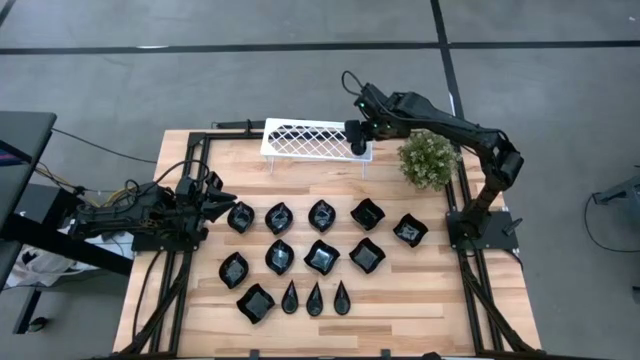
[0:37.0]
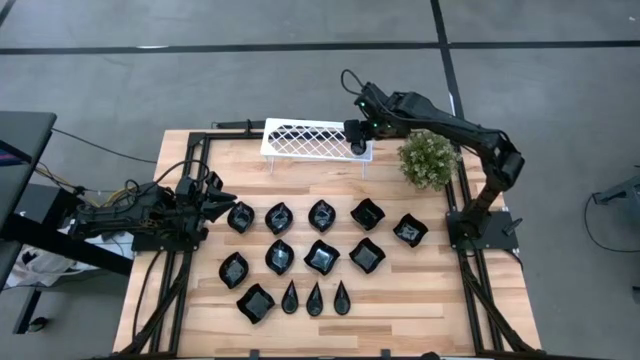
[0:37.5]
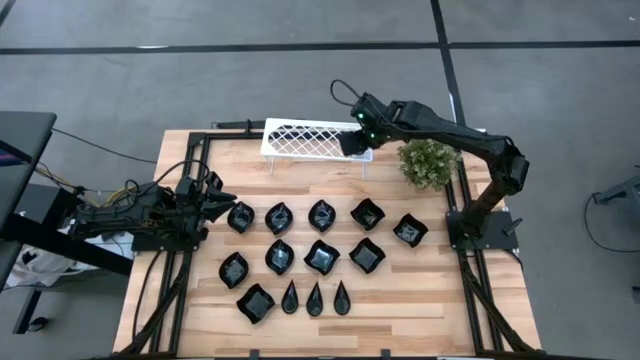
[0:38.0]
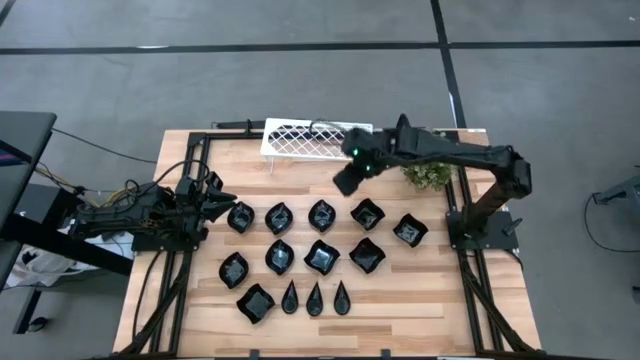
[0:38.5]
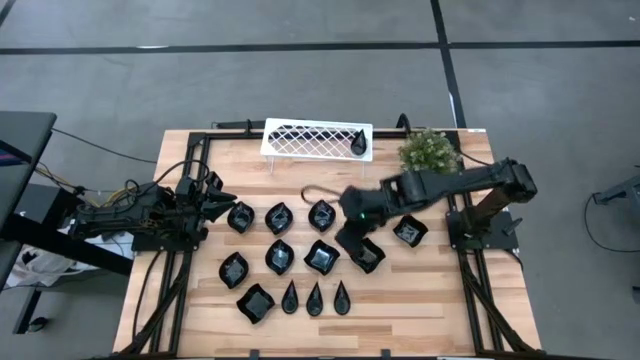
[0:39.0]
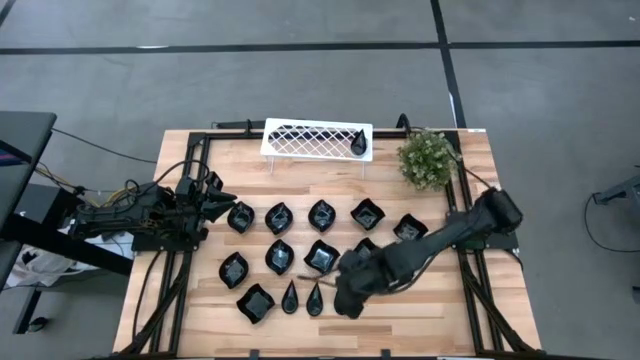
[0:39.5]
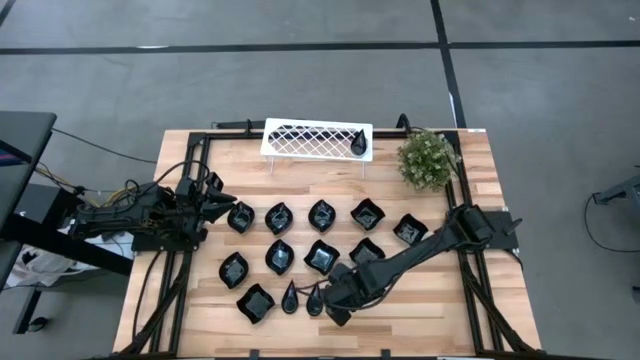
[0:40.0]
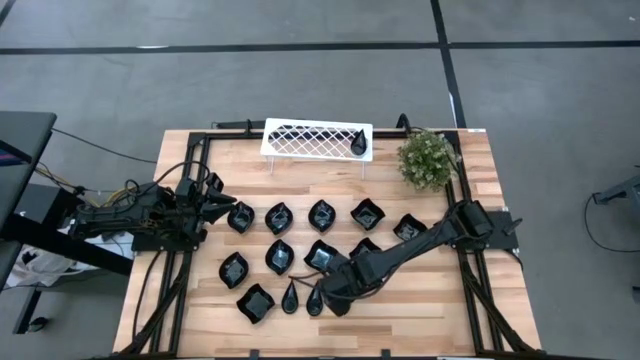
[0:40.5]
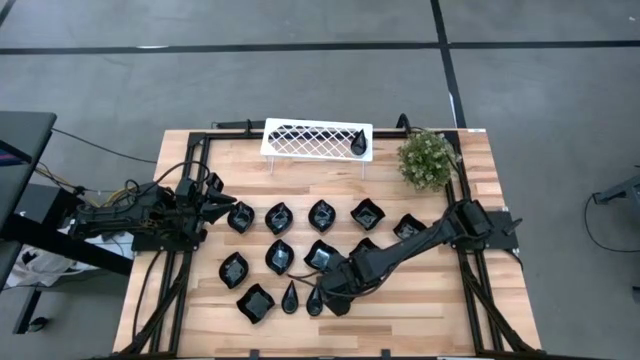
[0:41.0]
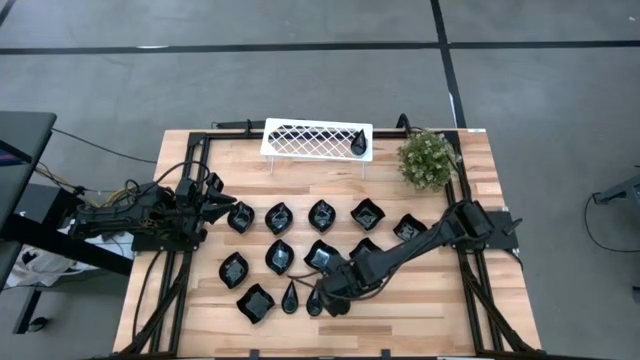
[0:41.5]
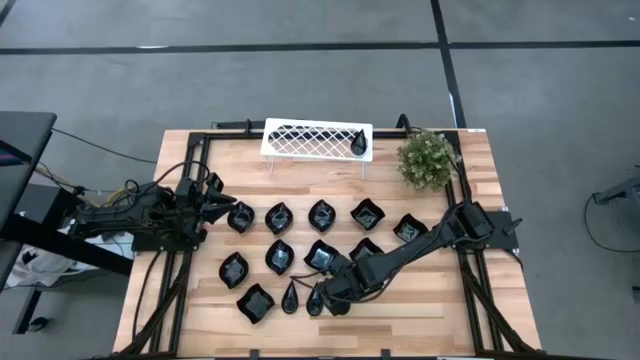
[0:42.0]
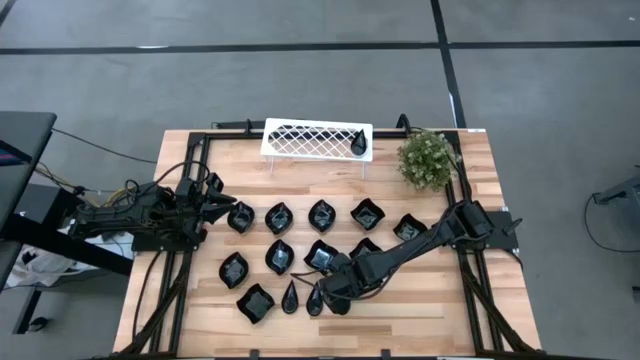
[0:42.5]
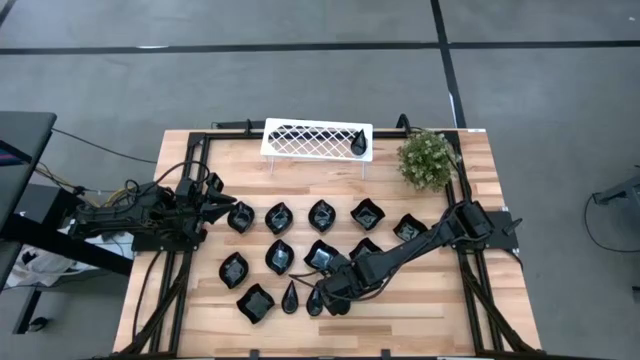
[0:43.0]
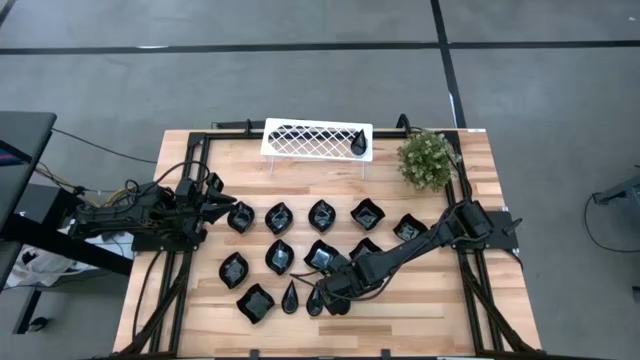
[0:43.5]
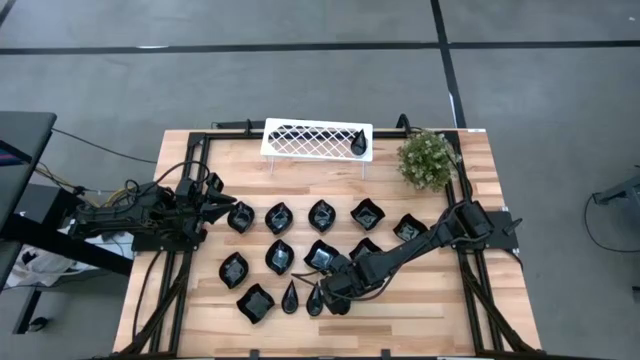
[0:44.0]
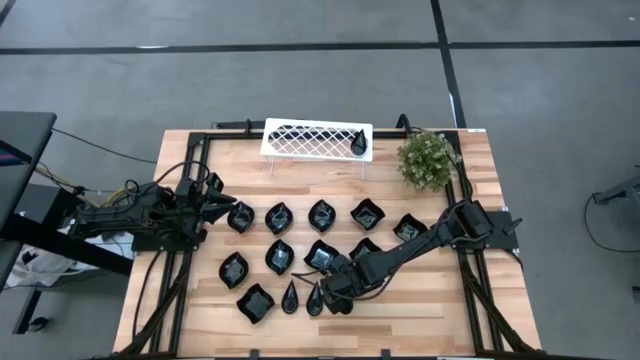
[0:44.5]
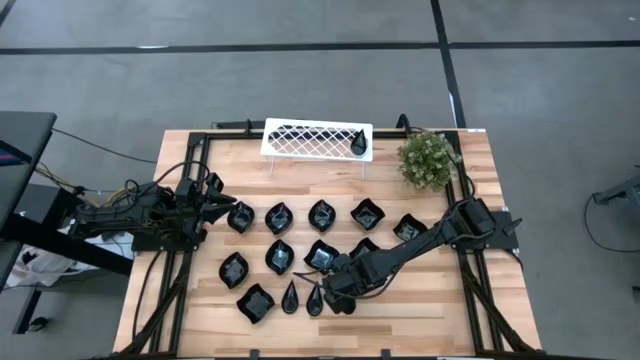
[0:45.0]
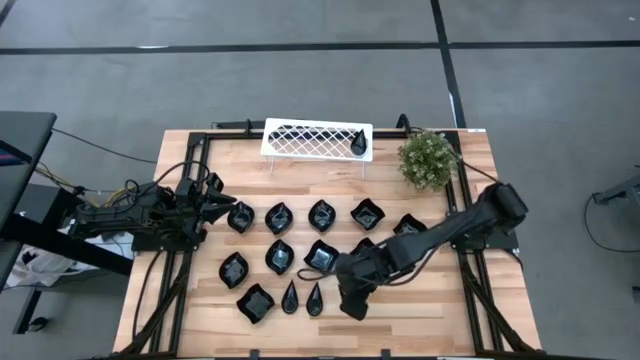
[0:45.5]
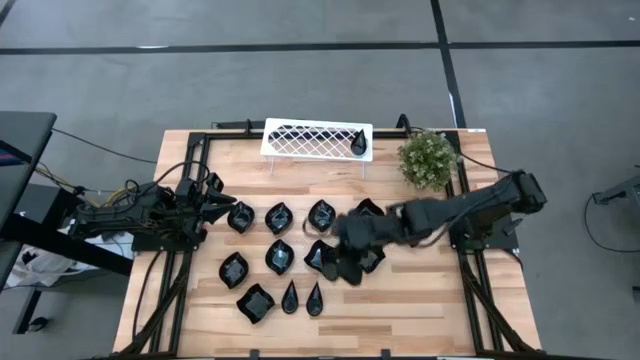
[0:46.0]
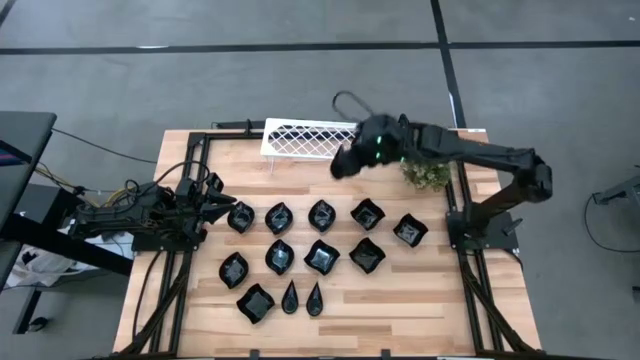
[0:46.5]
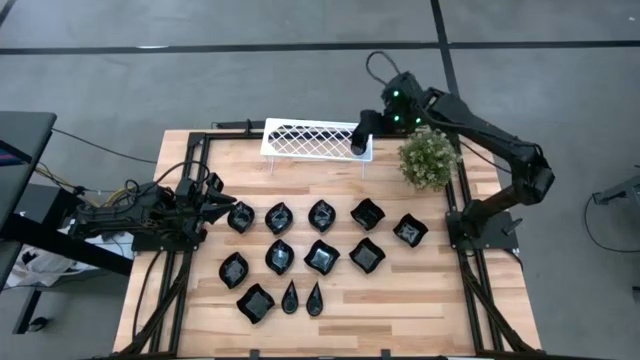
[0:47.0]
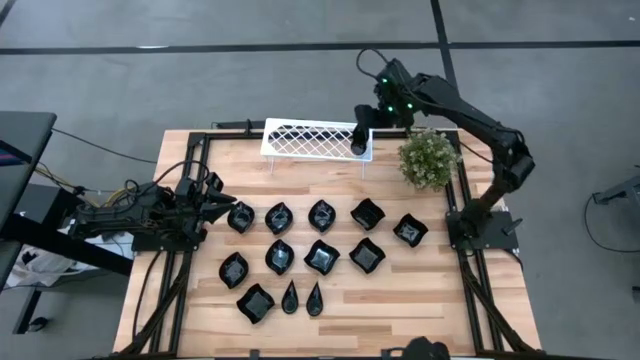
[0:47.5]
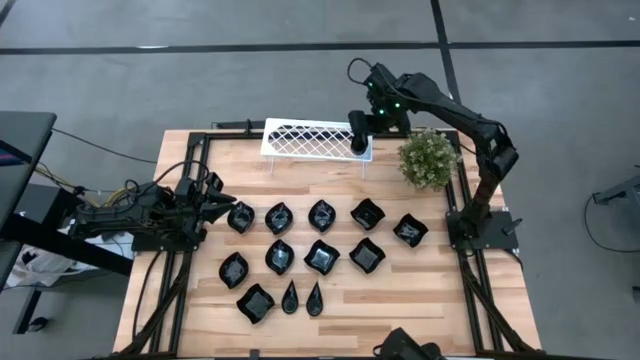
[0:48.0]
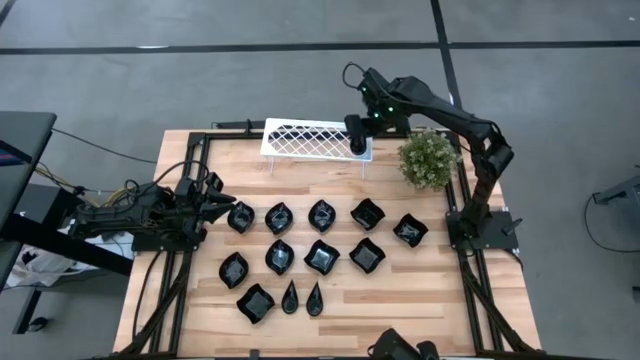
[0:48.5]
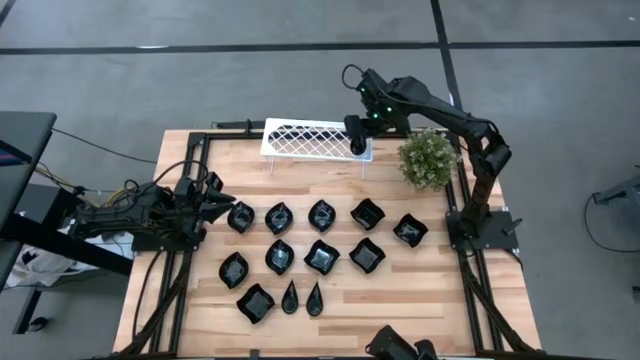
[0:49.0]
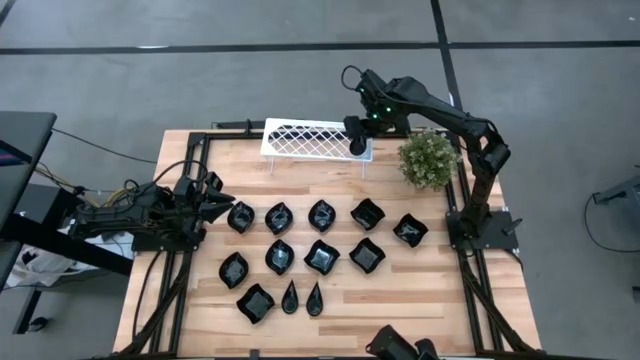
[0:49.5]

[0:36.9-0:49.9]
Task: Pick & Place Mini shaped plates
Stack the black drop shaped plate on top of the black drop shaped plate on the shelf

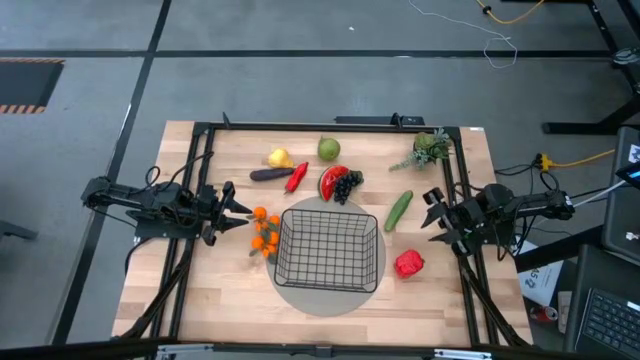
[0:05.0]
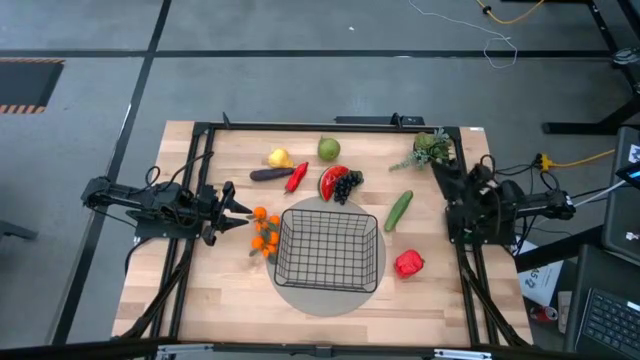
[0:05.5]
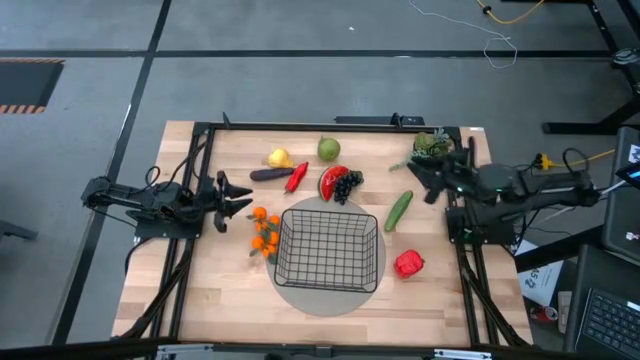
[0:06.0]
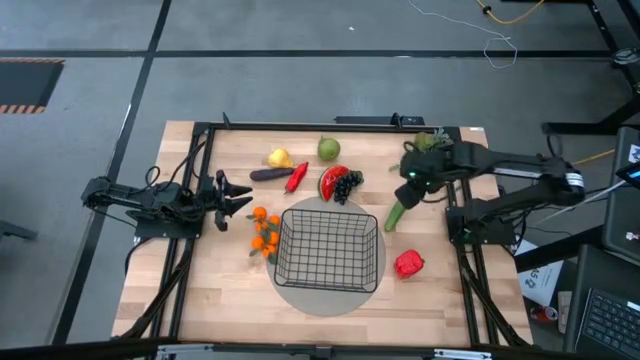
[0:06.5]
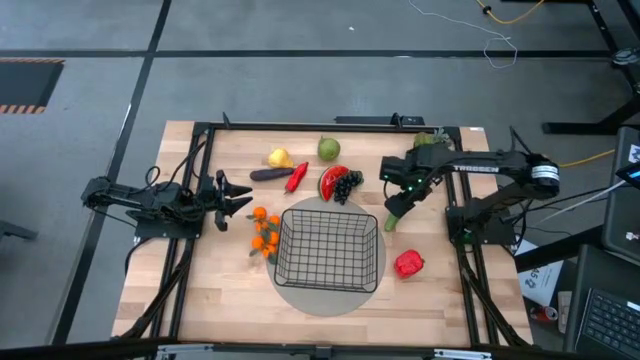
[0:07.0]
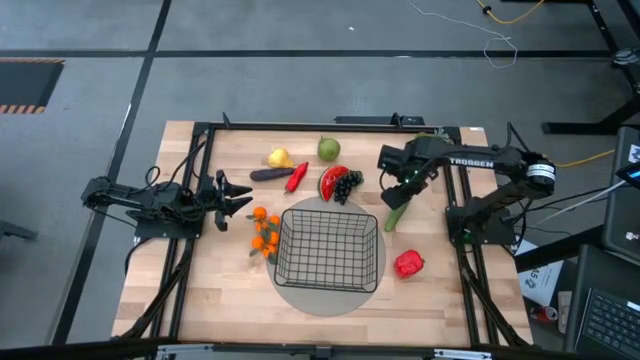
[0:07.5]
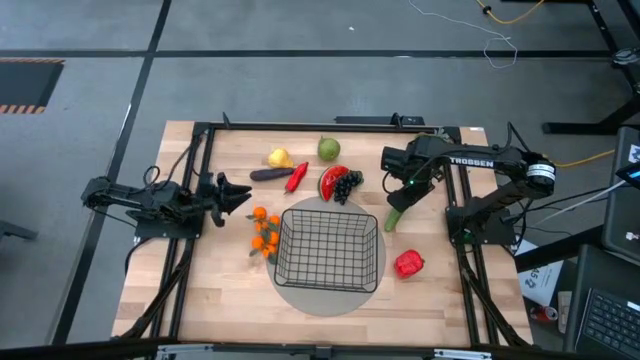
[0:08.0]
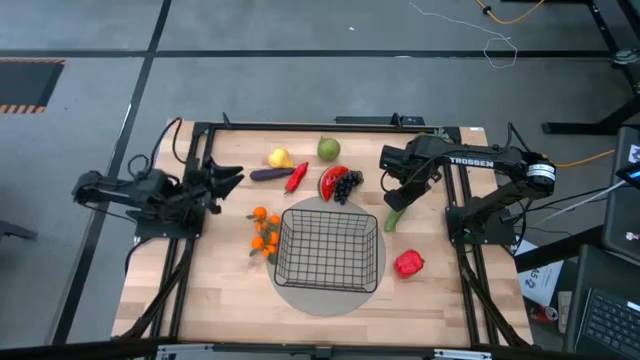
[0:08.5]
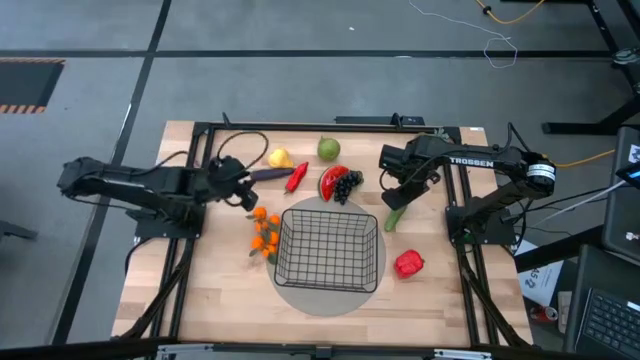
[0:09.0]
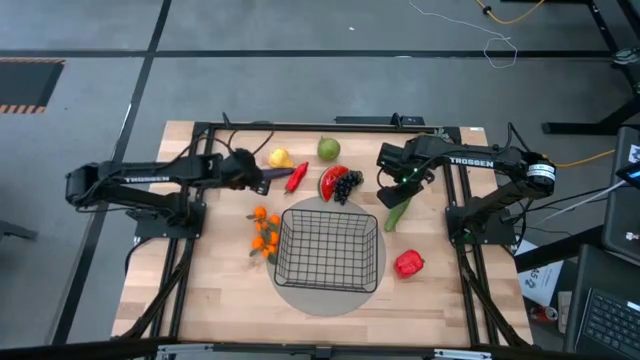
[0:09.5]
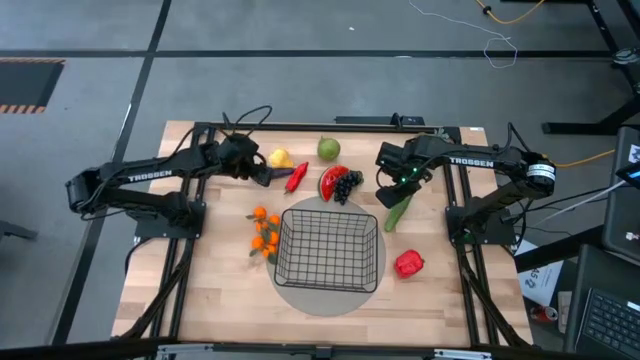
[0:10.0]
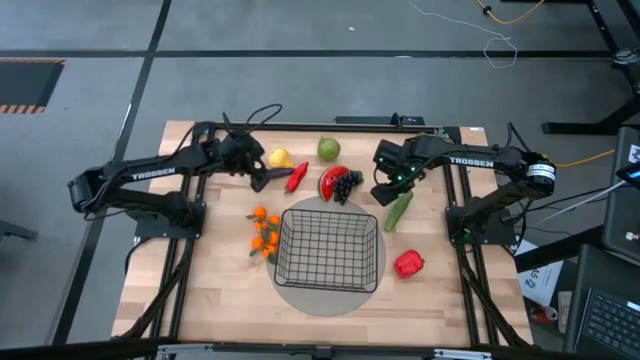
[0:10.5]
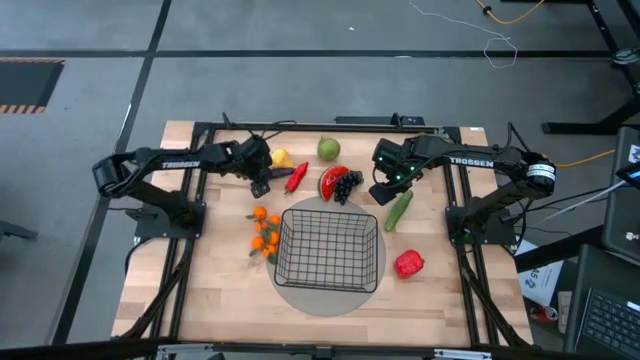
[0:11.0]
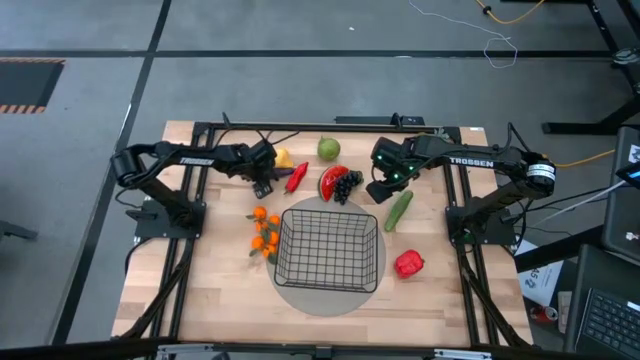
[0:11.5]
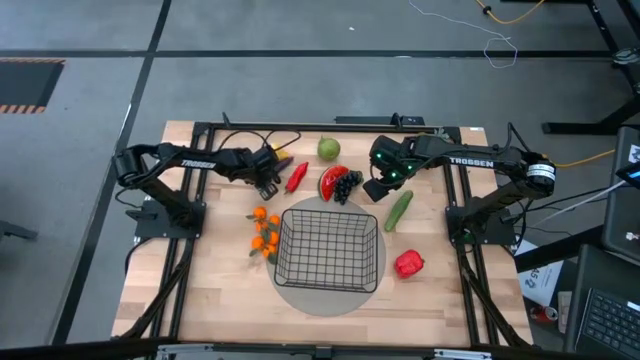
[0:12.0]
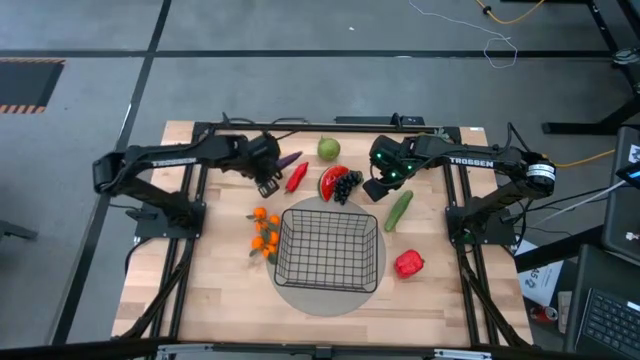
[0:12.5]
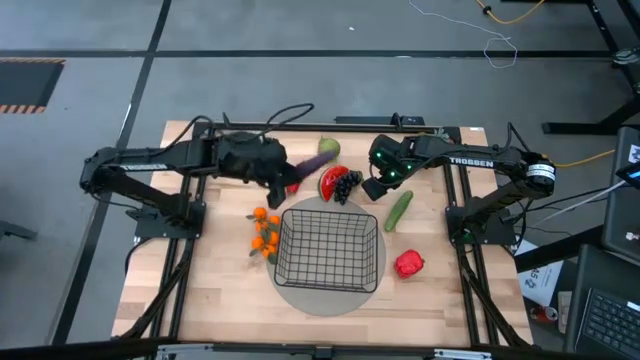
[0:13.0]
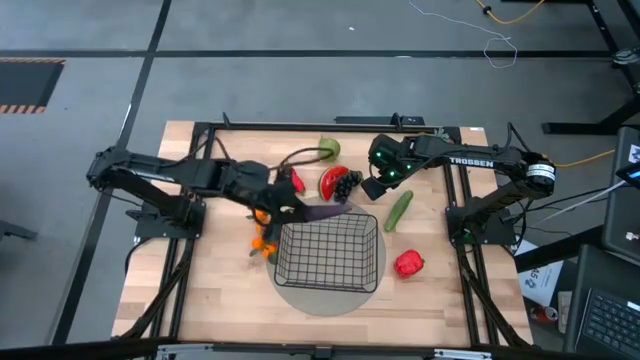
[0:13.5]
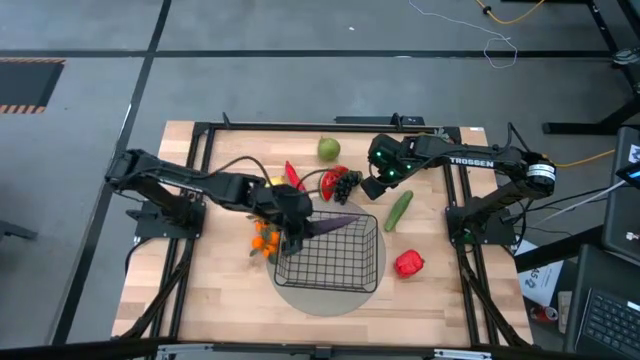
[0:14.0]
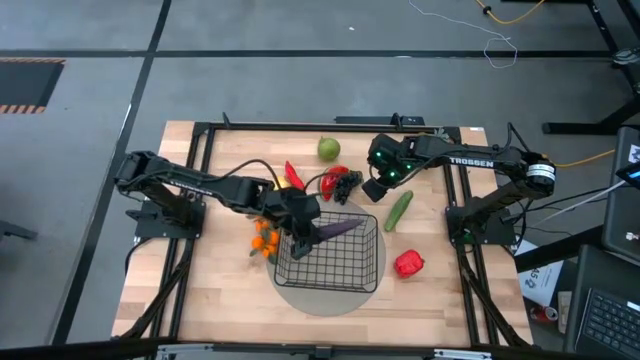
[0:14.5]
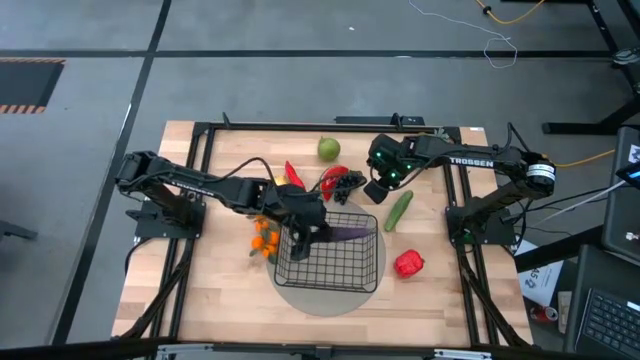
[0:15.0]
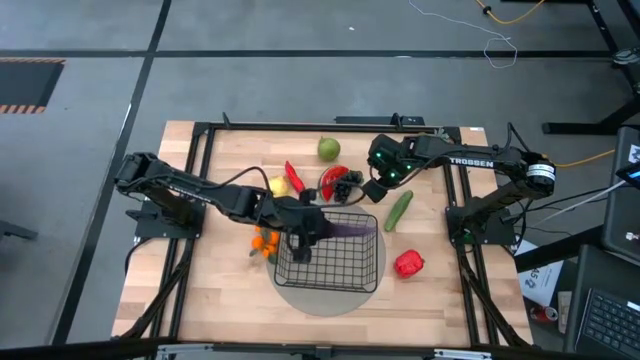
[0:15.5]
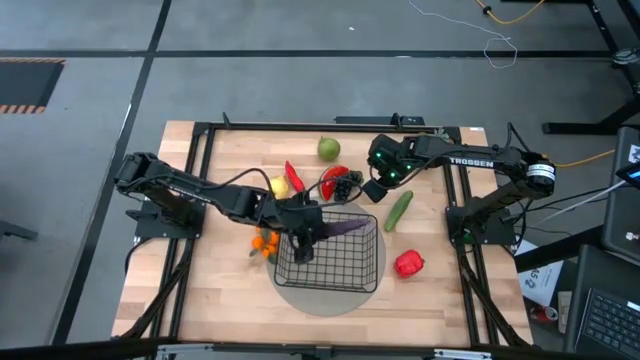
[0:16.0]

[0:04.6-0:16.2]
Task: Build produce basket
Put the violet eggplant into the black wire basket
